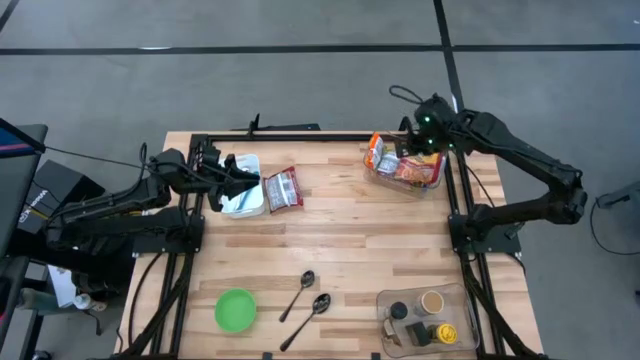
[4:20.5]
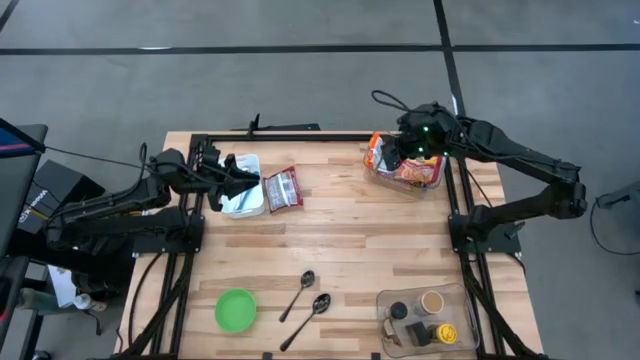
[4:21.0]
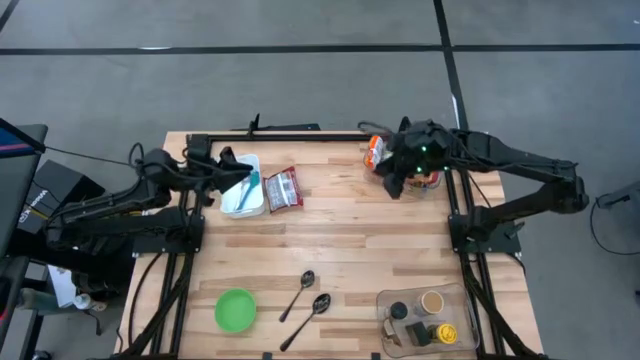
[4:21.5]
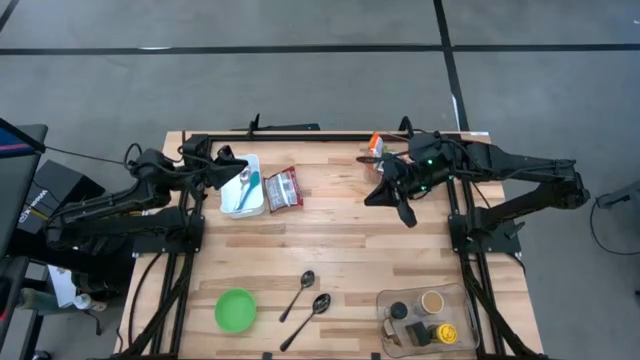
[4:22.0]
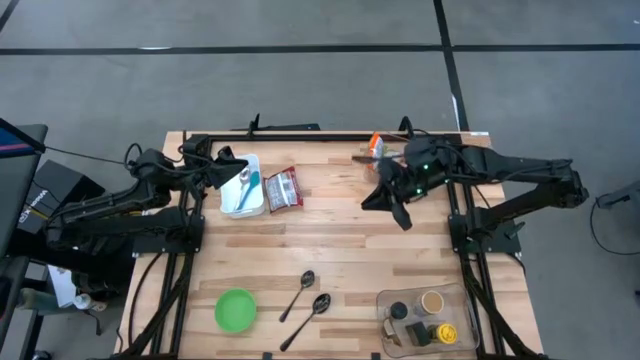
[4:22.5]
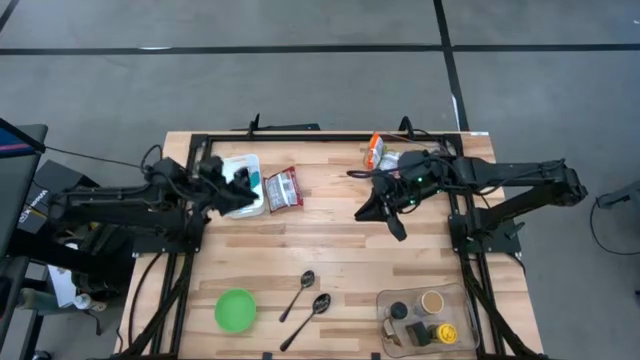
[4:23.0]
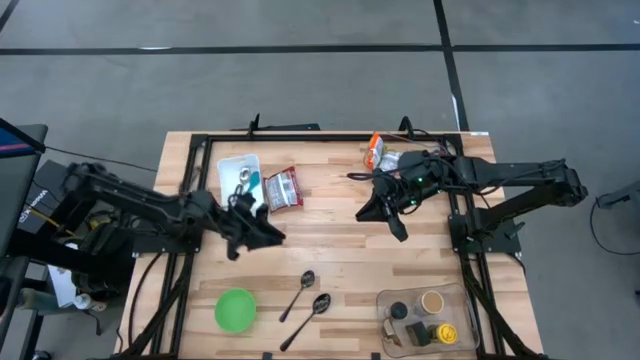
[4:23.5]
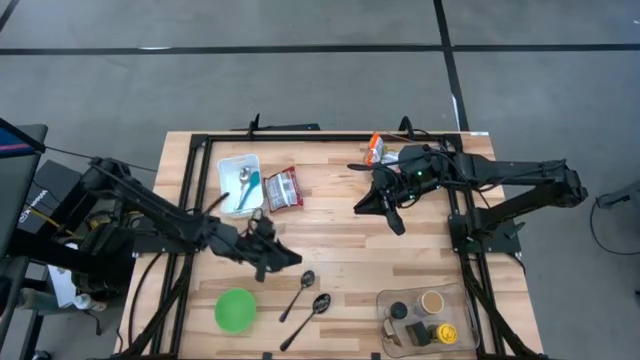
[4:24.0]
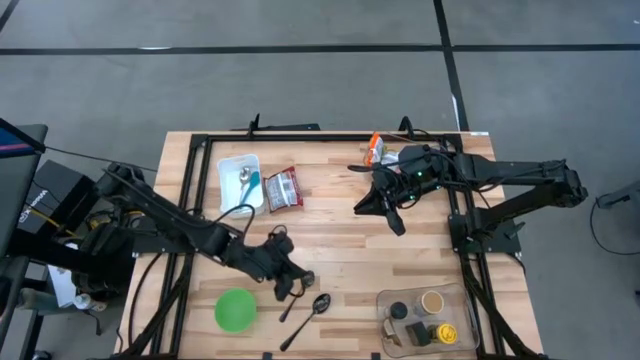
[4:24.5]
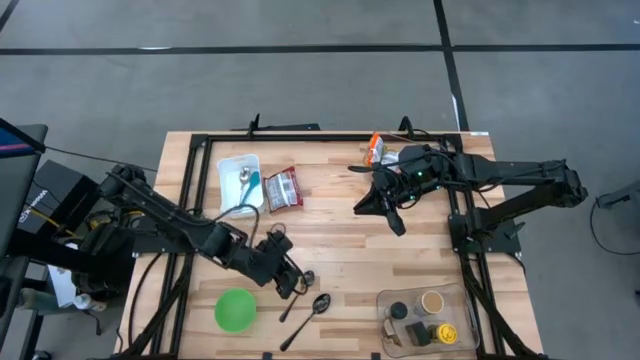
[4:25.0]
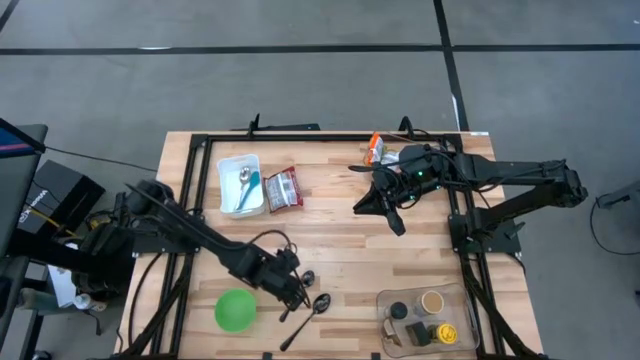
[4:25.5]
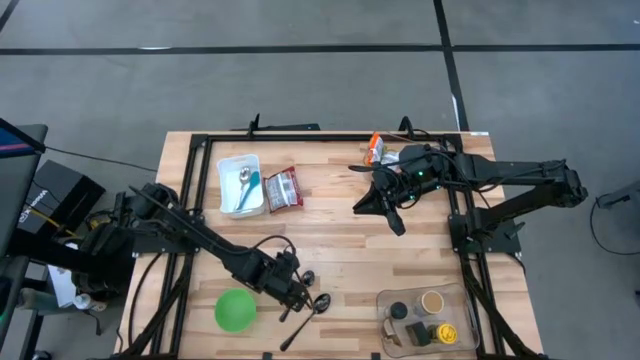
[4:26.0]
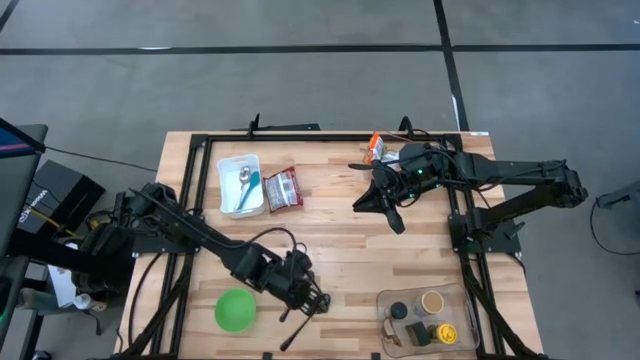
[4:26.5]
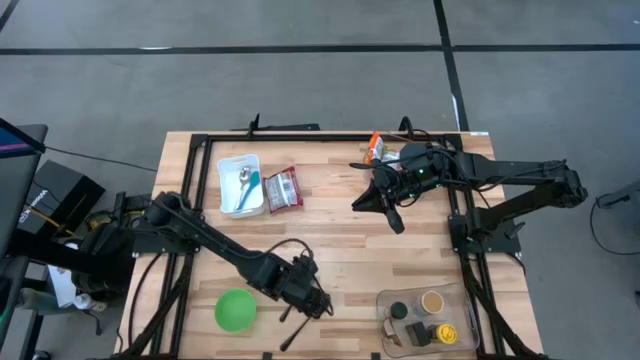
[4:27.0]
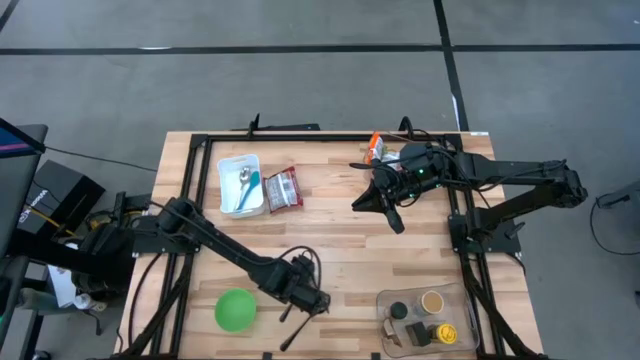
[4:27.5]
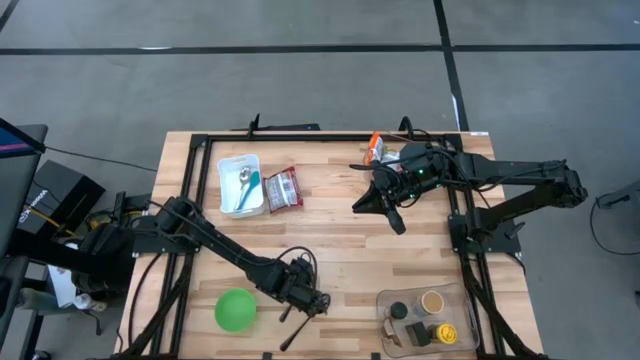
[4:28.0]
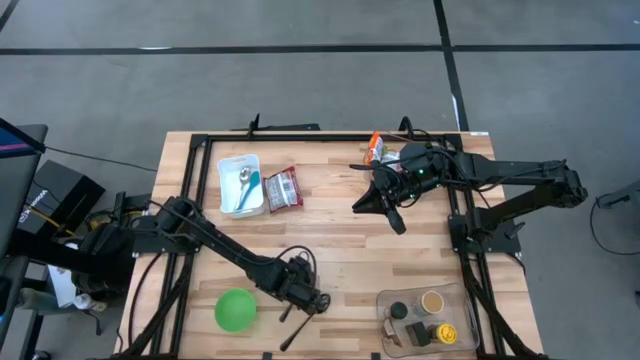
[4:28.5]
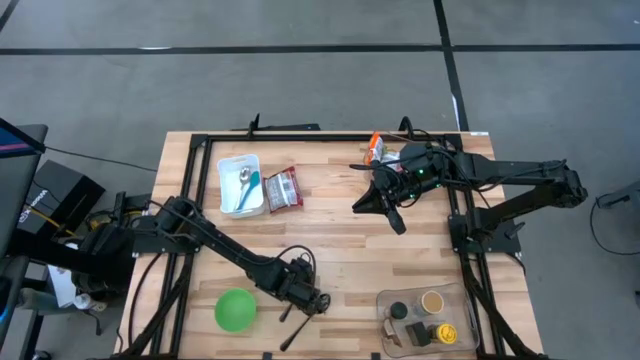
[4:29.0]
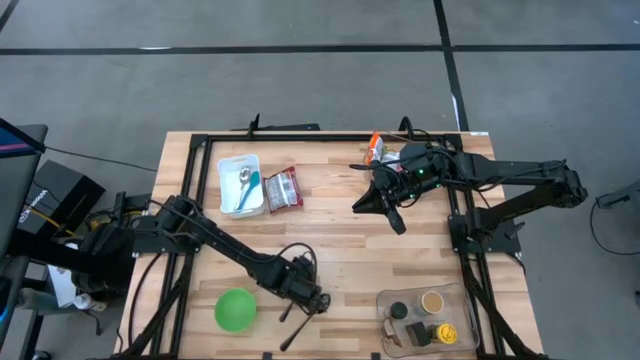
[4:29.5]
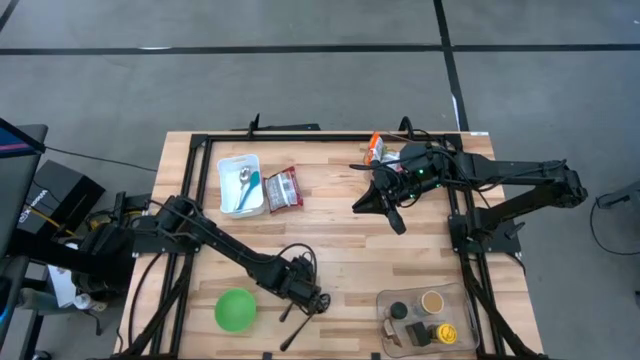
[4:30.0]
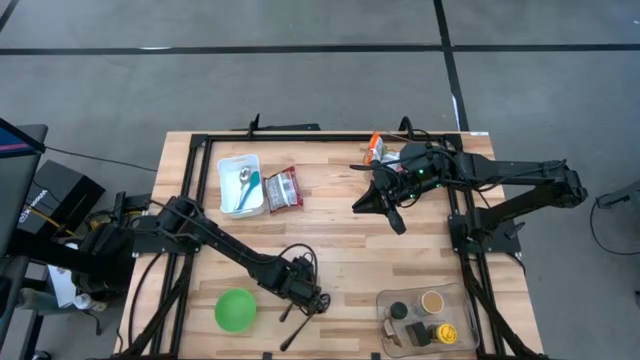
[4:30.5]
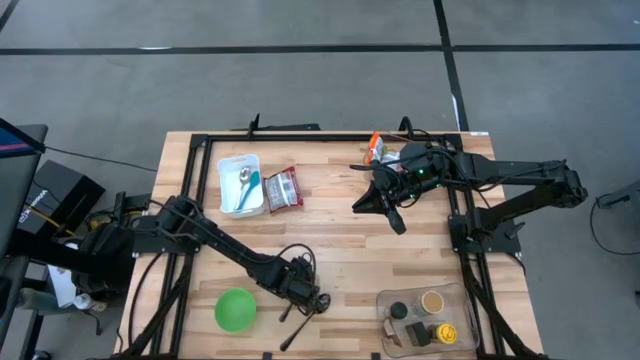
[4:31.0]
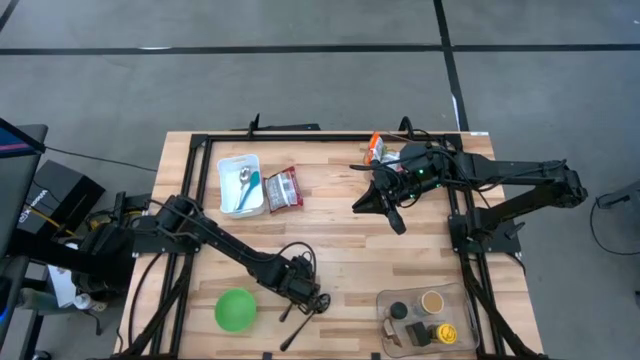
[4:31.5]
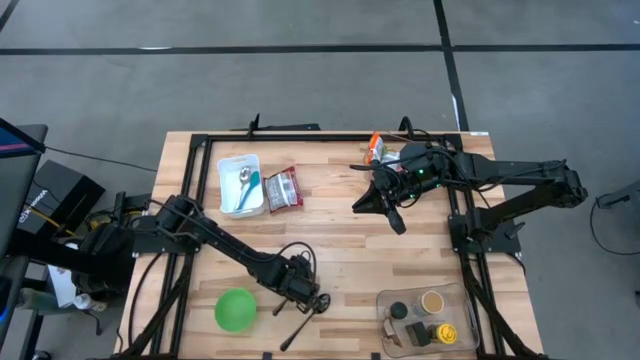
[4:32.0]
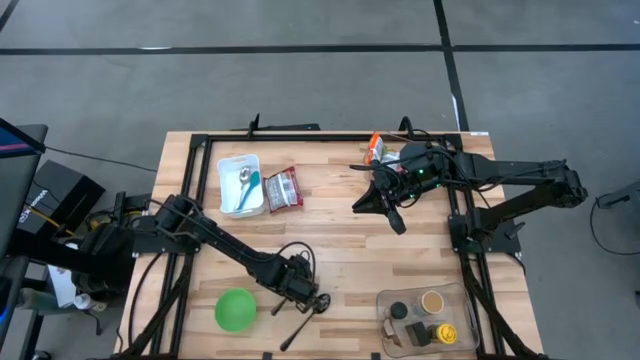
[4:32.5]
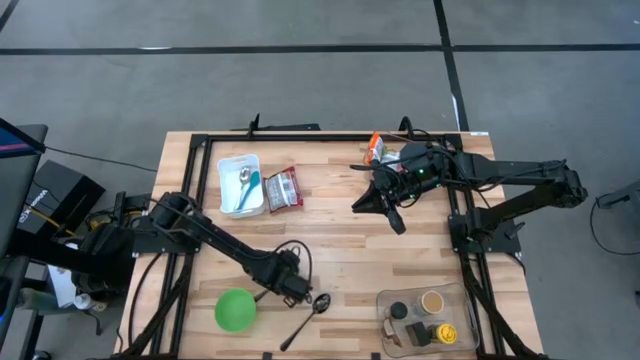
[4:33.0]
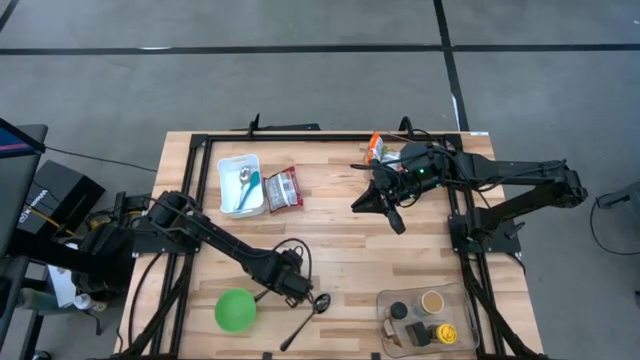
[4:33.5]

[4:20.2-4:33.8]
Task: Pick & Place Food Item
Put the top black spoon into the white bin

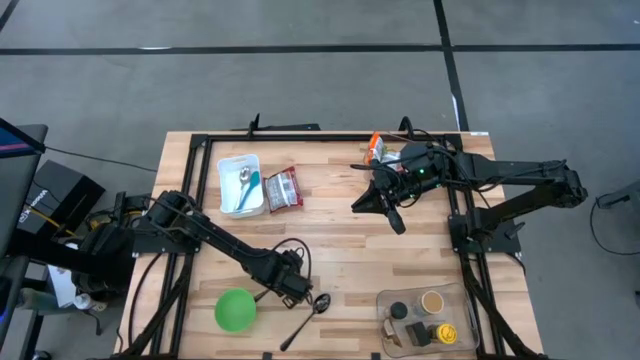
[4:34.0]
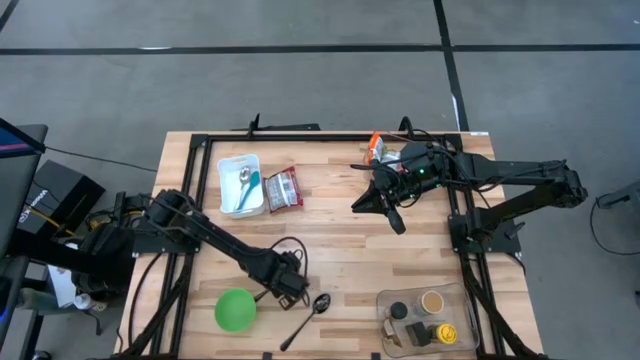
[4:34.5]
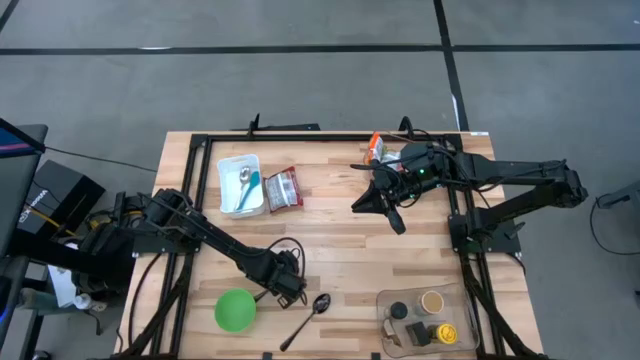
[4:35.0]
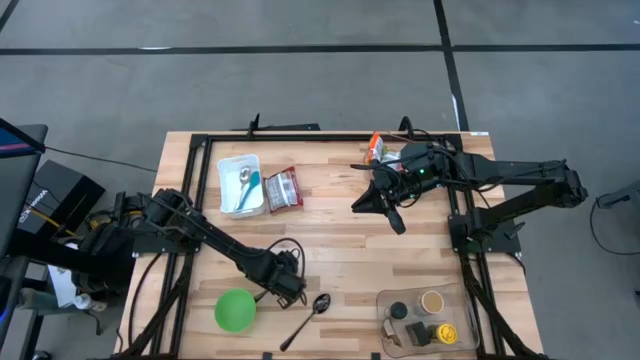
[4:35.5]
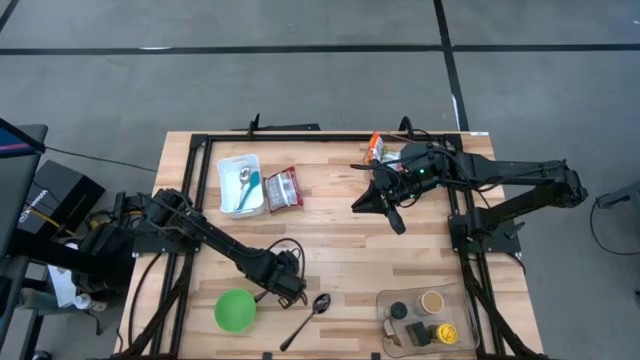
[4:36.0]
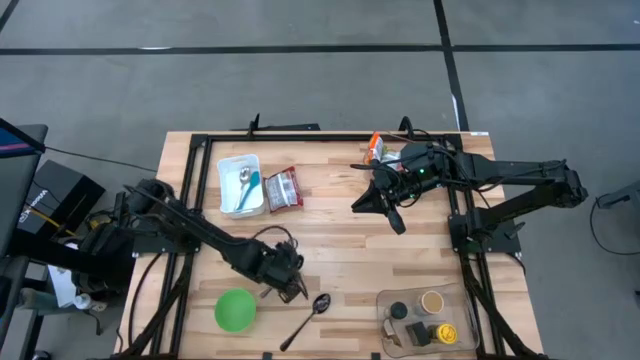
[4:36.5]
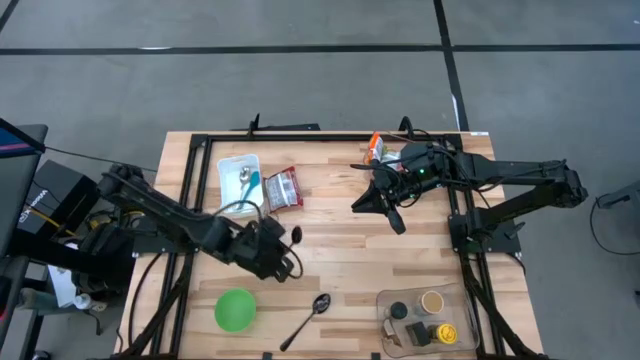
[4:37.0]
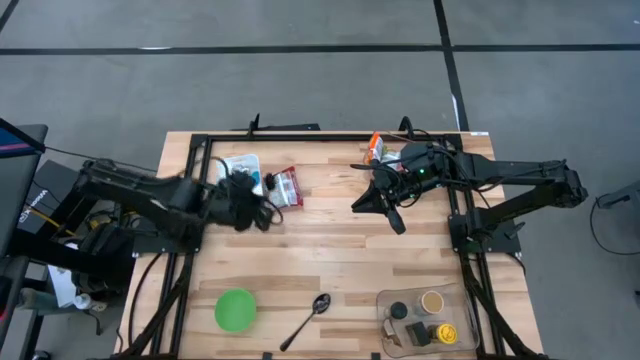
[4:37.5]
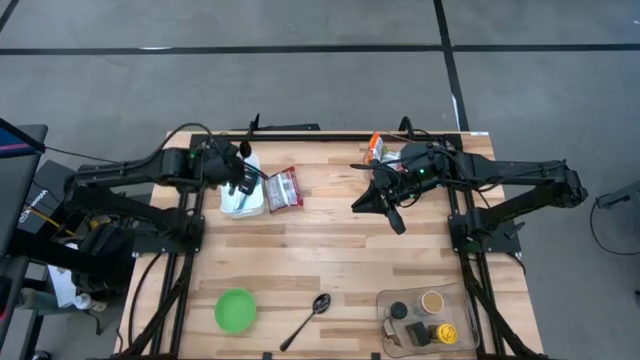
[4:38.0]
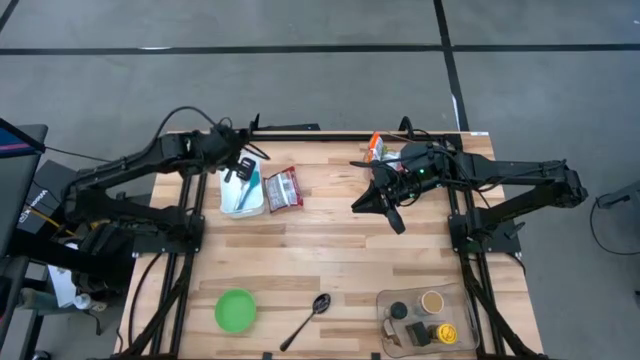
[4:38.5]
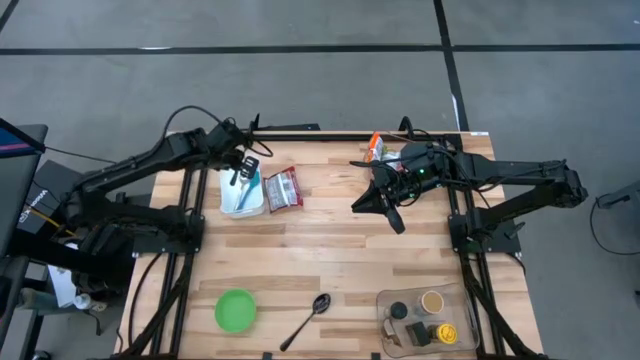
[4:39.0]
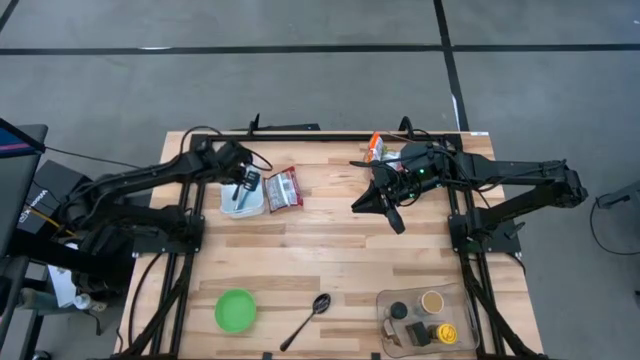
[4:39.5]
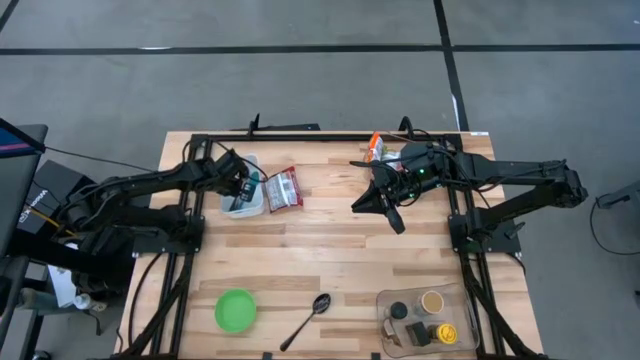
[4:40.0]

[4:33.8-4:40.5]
Put the top black spoon into the white bin

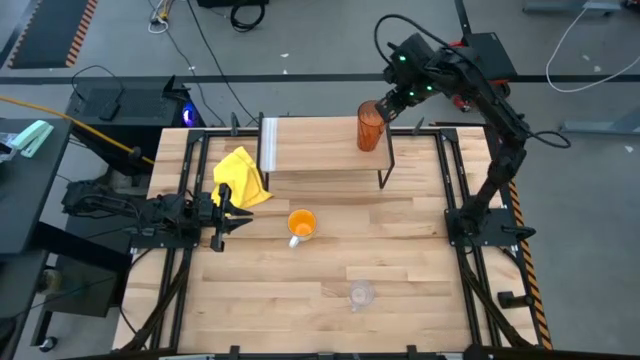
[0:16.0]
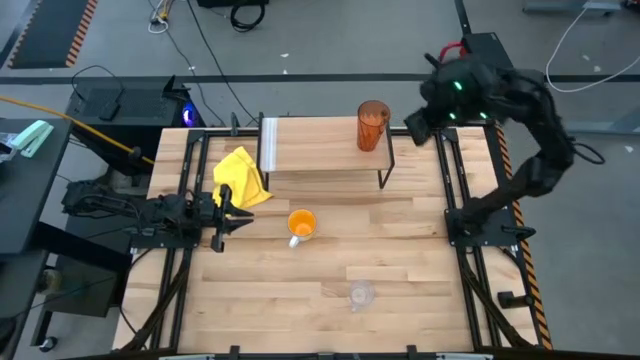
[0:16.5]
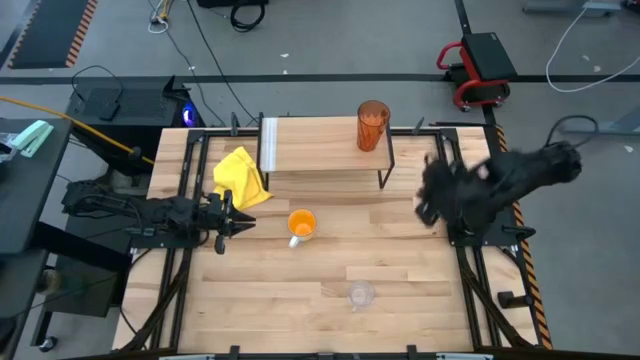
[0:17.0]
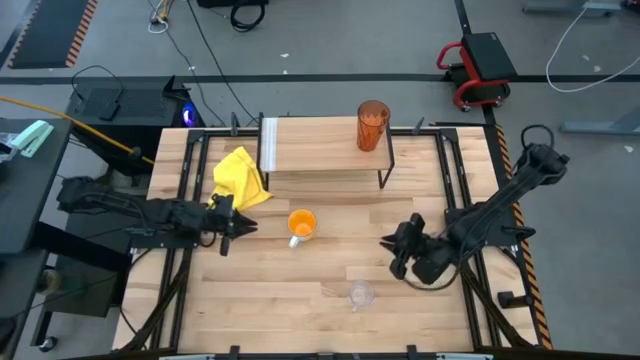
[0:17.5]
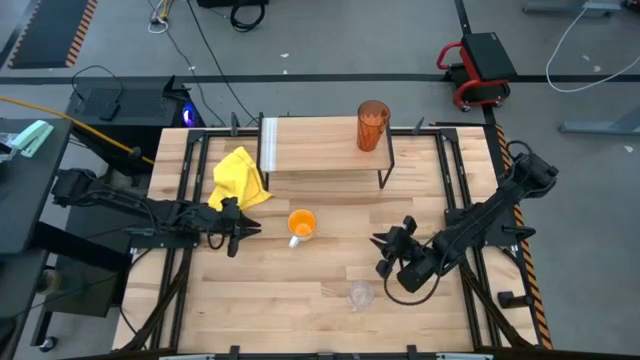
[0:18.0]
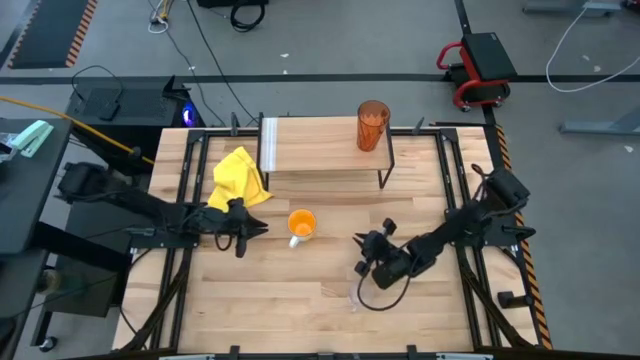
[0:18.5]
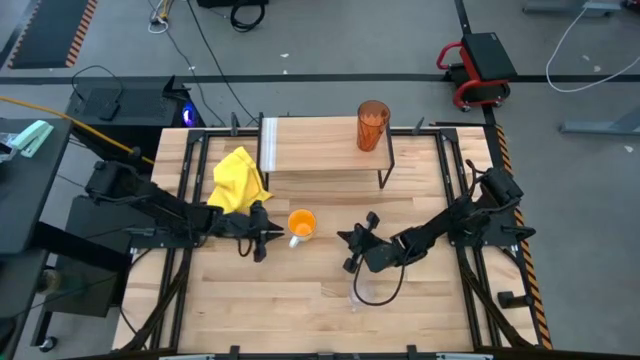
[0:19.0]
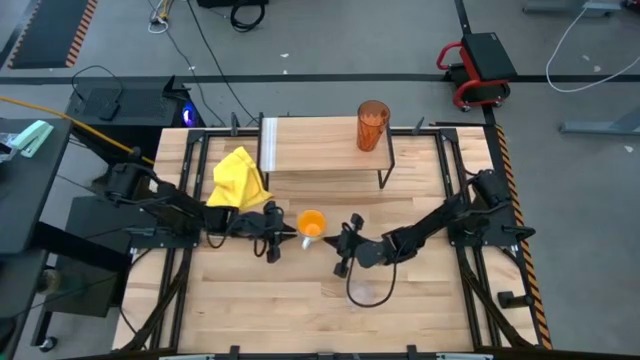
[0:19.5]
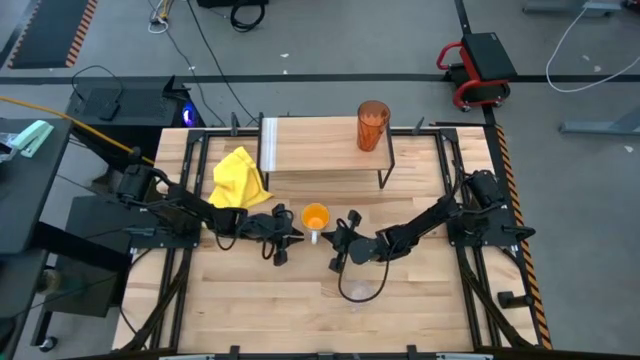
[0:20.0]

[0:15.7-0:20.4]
Task: Stack small to large cups/mugs on shelf
Adjust the yellow mugs on the table
